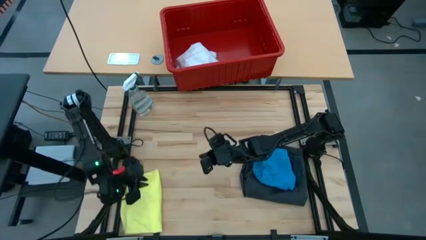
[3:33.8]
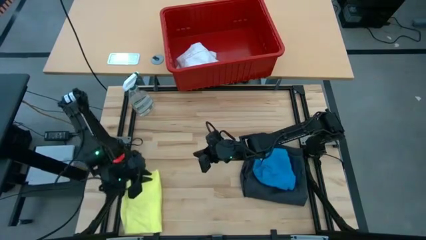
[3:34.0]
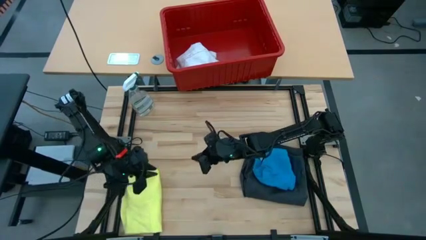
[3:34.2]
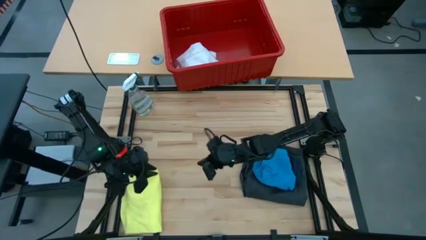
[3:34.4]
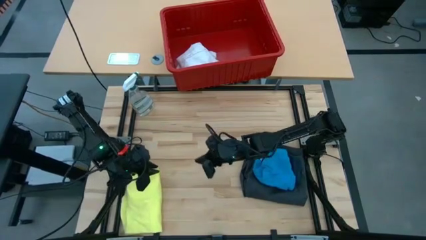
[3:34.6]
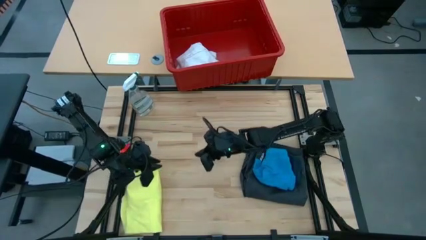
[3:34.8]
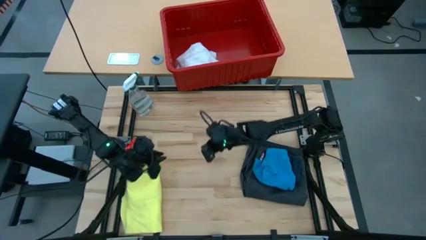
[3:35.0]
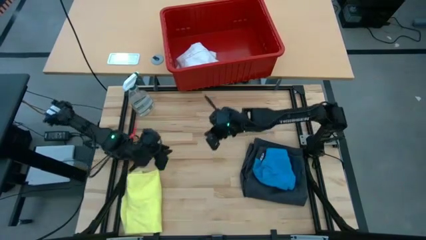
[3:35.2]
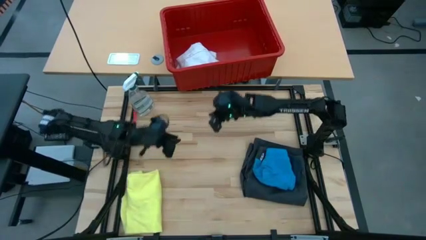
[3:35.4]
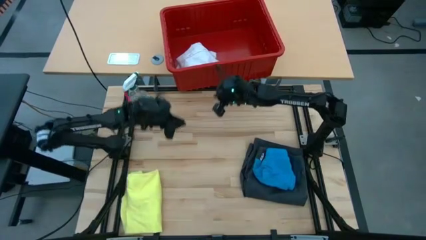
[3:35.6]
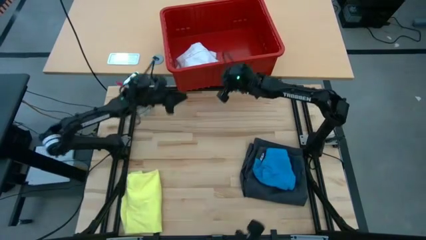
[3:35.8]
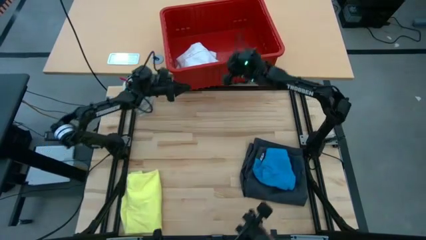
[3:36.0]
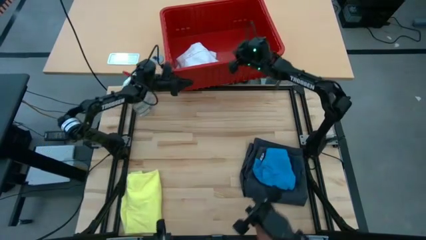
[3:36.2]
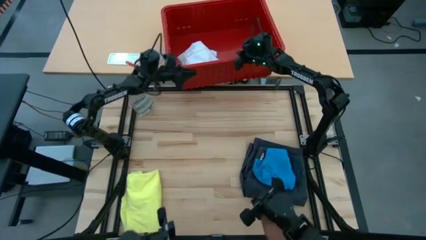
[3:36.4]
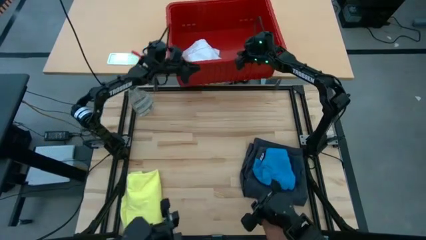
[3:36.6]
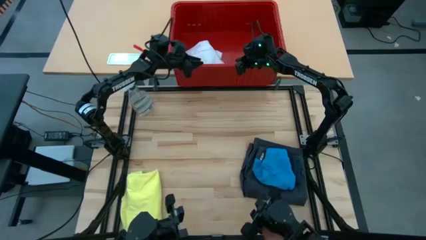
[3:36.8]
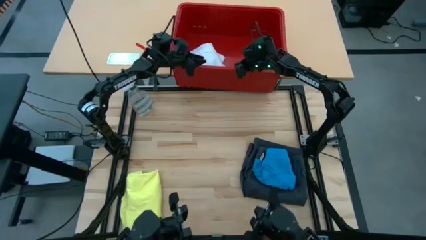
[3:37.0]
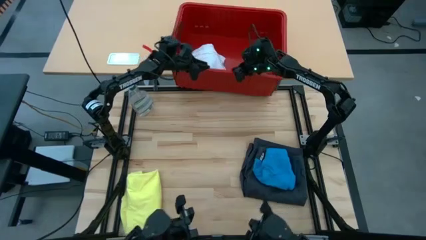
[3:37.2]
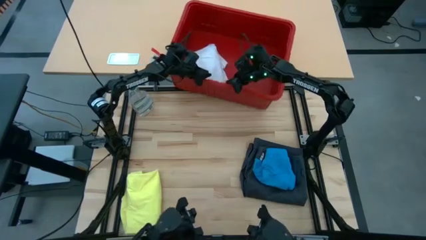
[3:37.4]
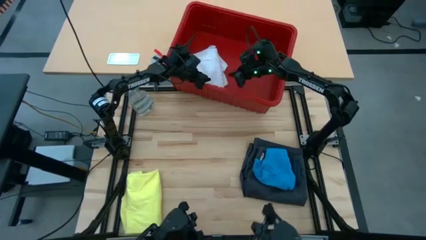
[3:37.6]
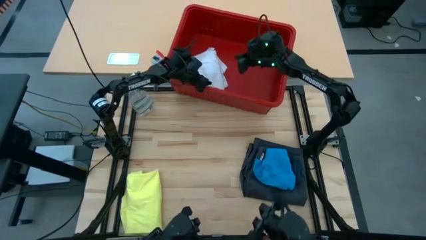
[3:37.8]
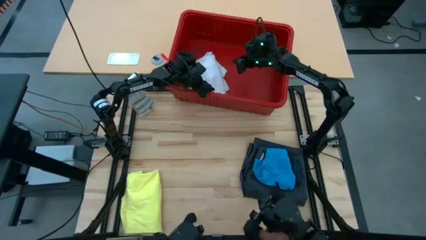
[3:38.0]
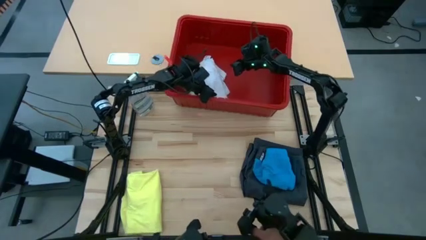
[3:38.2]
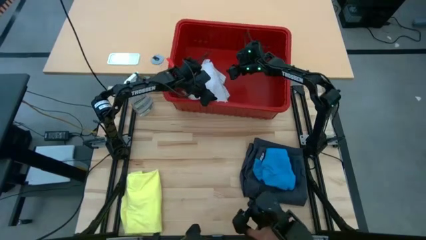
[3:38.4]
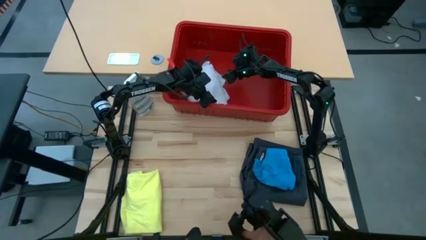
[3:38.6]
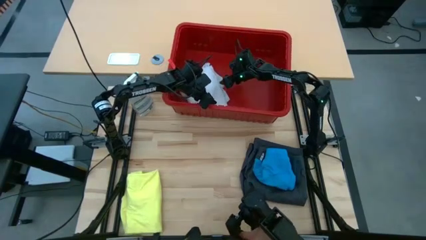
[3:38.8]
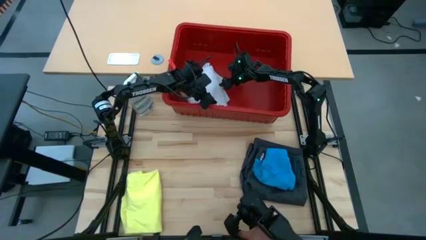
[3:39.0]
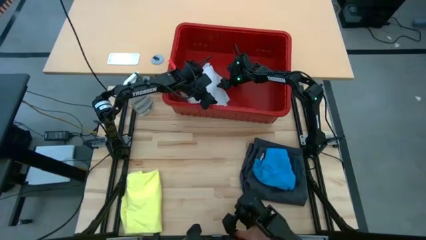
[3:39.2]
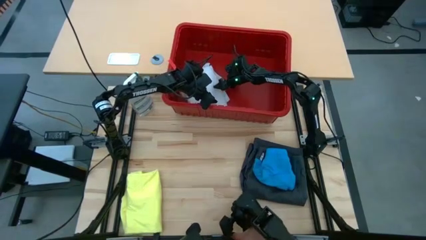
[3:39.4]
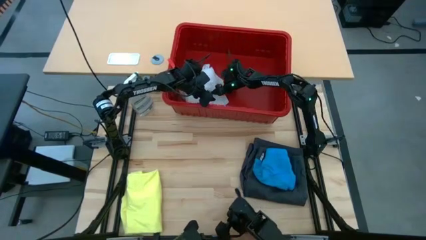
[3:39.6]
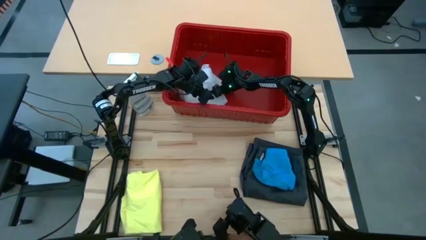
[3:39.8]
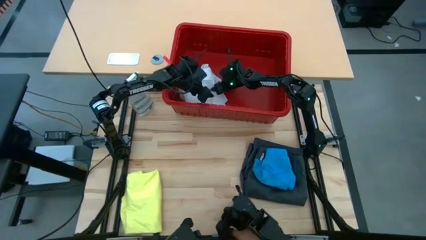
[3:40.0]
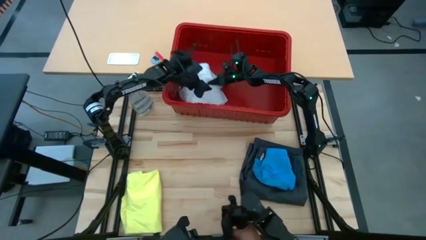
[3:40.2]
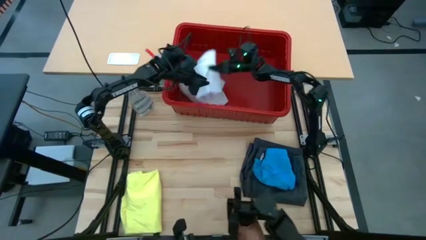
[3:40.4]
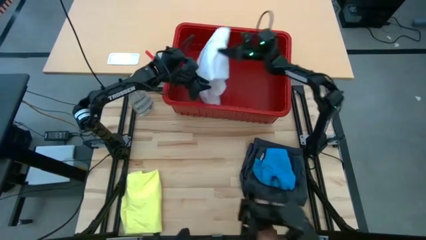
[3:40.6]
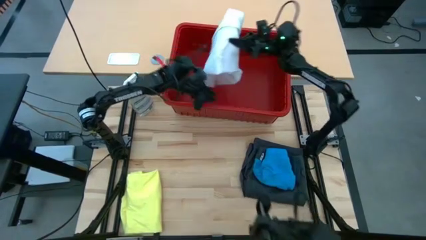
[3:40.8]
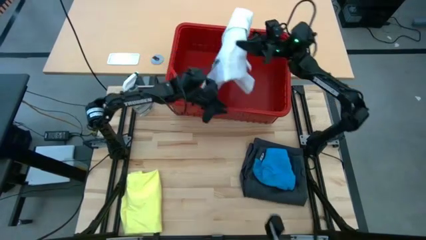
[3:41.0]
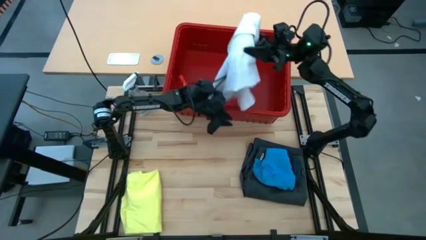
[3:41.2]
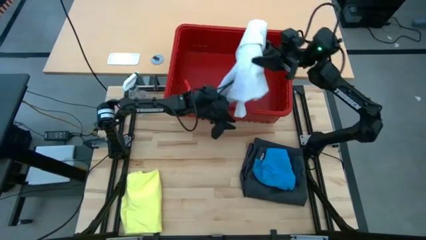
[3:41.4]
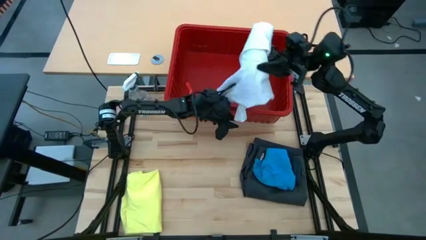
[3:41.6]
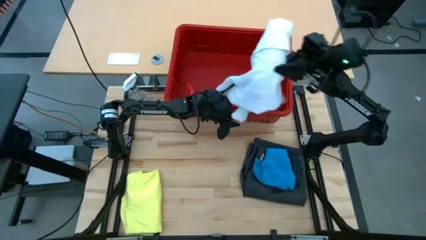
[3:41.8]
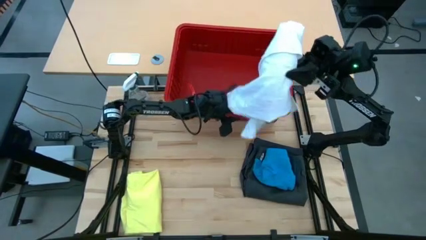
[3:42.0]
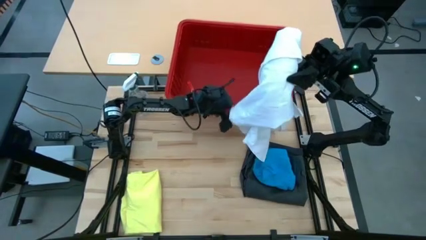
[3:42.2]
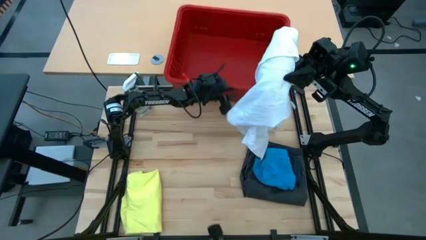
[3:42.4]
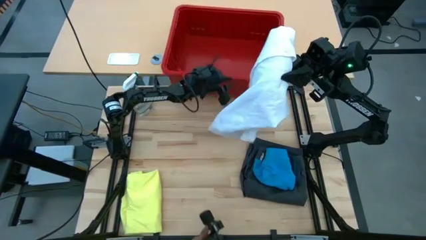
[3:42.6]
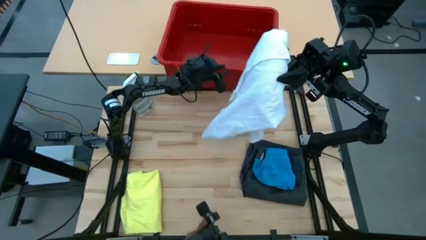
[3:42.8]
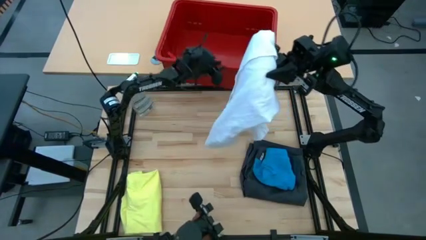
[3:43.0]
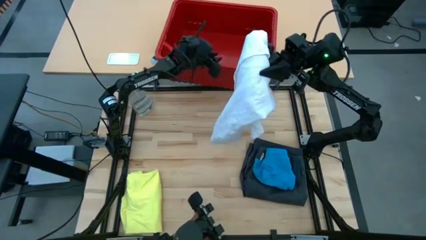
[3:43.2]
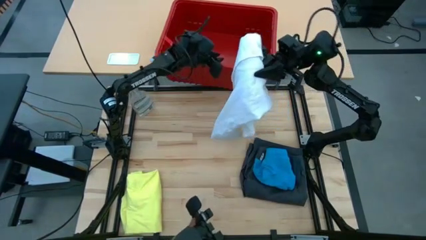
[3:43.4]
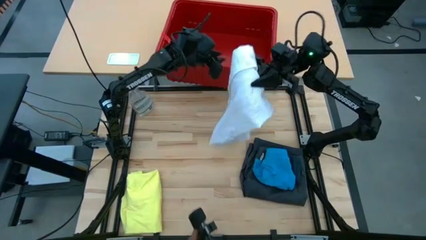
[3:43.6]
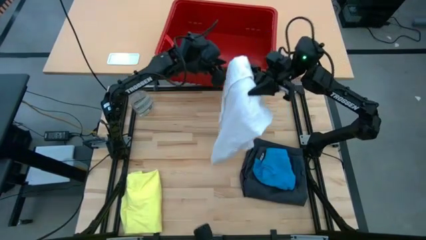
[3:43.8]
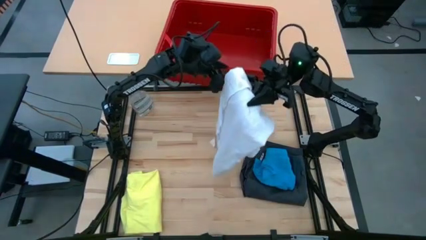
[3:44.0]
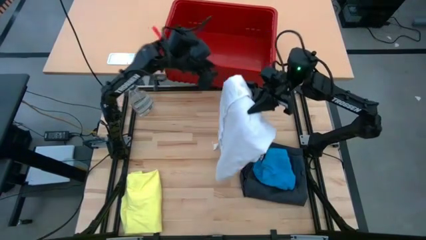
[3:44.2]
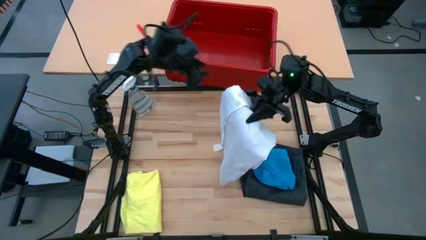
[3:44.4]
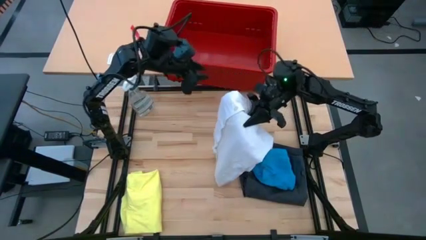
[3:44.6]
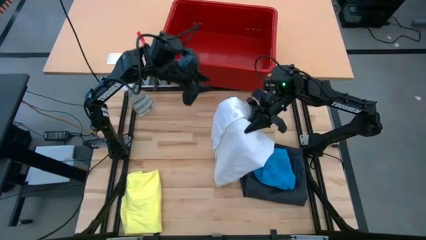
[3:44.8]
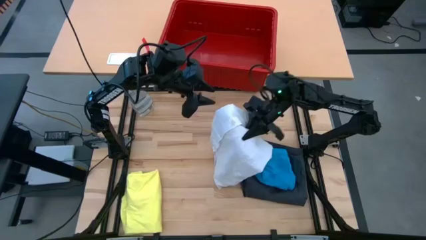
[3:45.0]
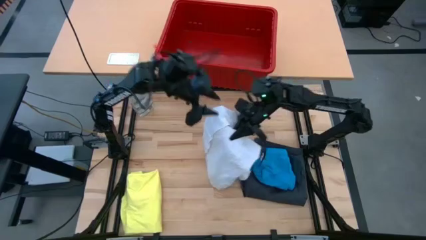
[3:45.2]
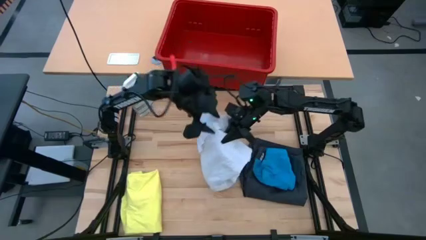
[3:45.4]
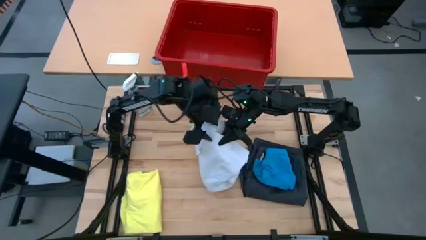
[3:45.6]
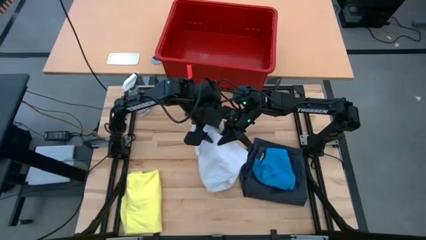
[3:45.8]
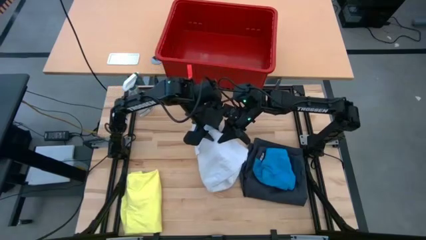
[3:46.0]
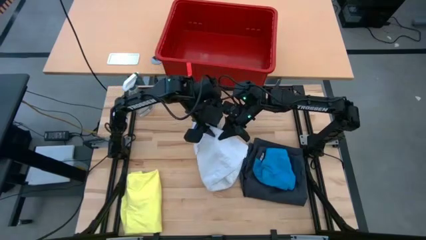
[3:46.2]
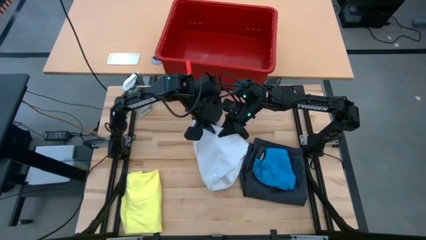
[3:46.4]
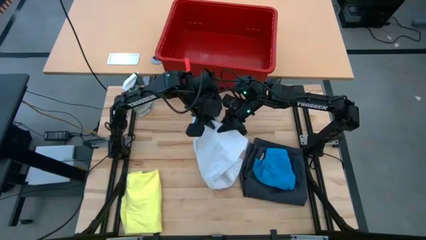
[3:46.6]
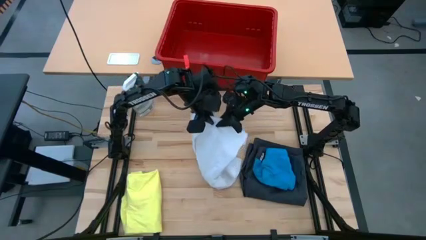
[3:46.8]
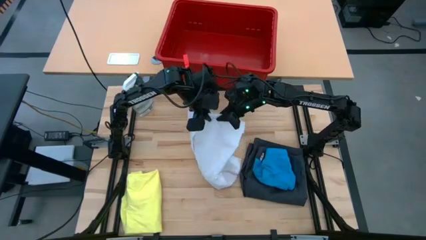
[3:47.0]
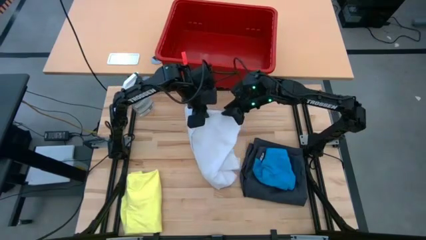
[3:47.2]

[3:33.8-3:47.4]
Task: Fold laundry
Remove the white polo from the red laundry bin
